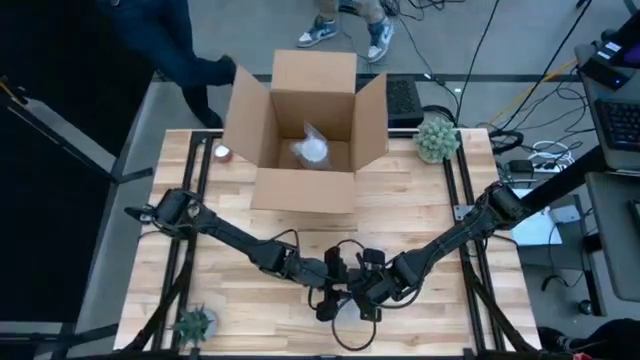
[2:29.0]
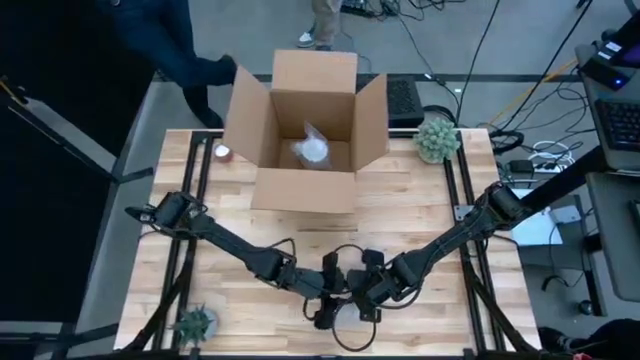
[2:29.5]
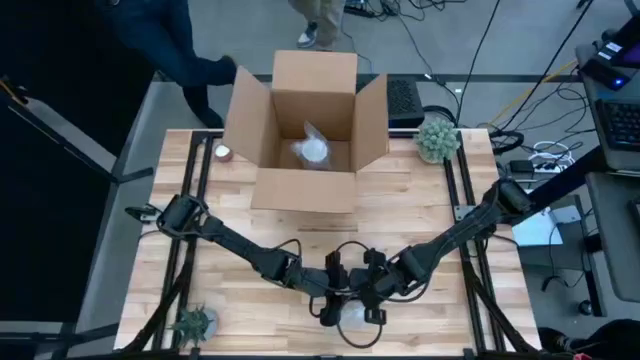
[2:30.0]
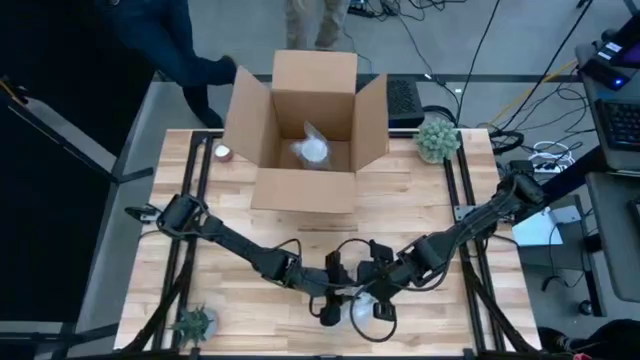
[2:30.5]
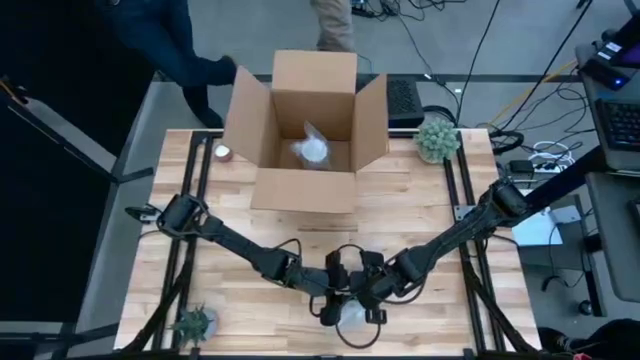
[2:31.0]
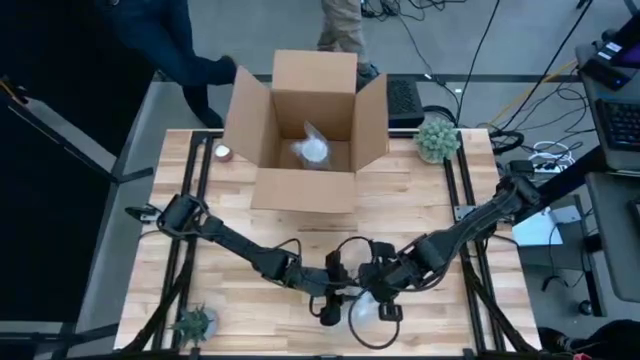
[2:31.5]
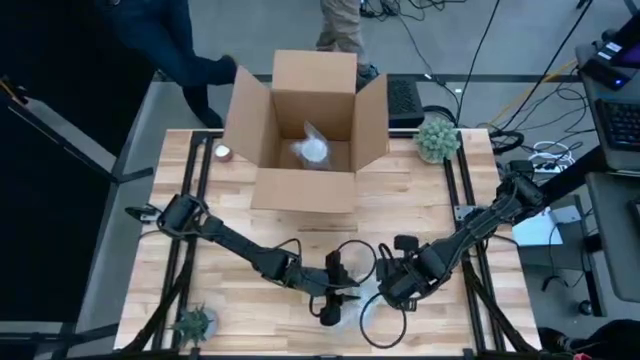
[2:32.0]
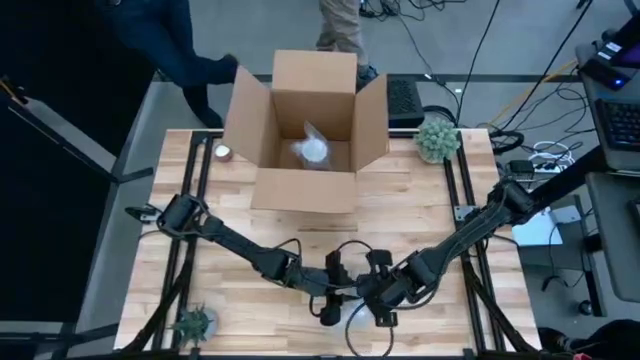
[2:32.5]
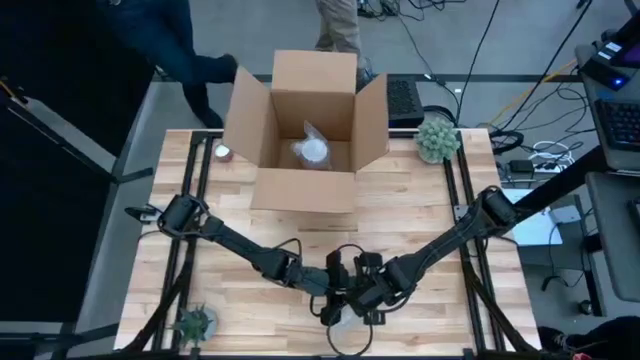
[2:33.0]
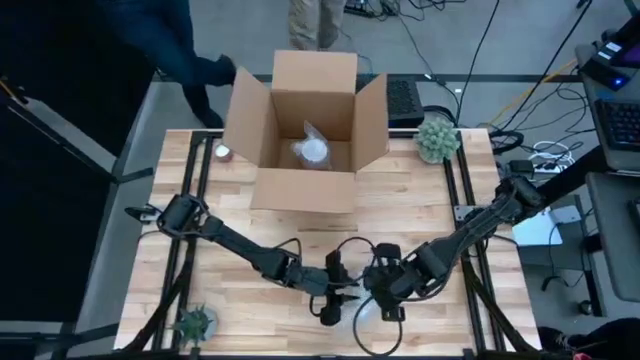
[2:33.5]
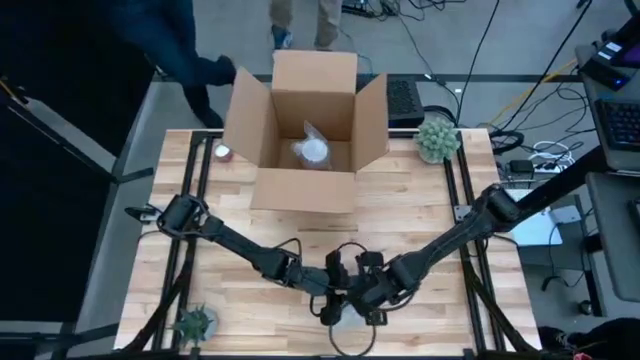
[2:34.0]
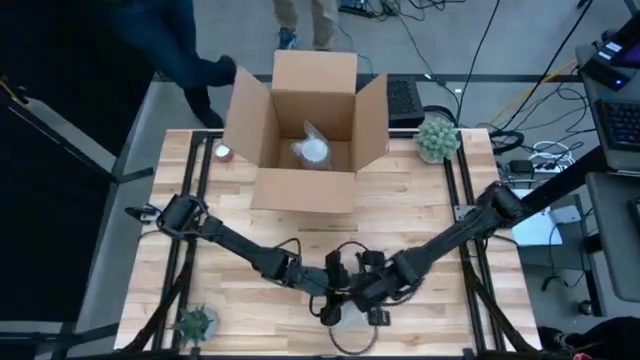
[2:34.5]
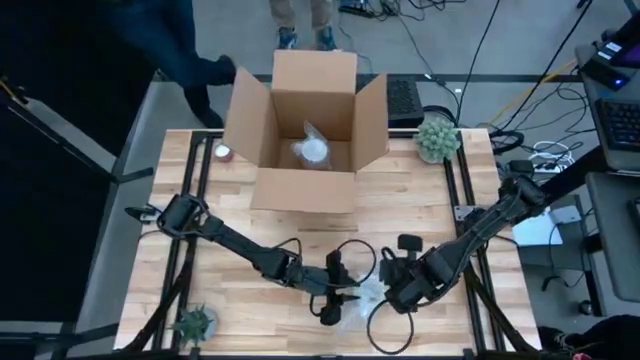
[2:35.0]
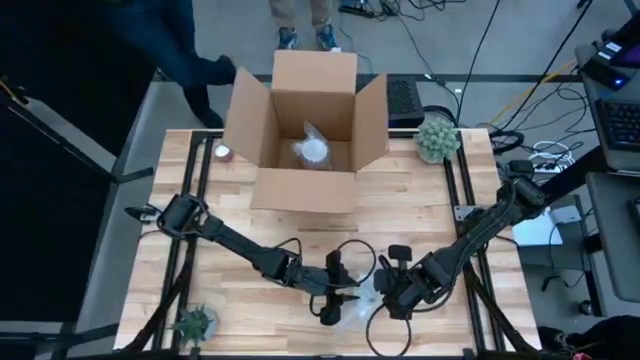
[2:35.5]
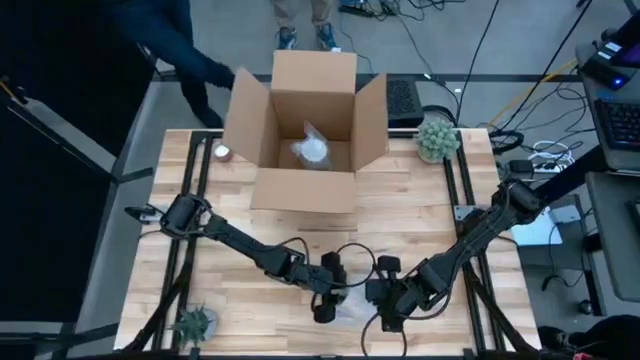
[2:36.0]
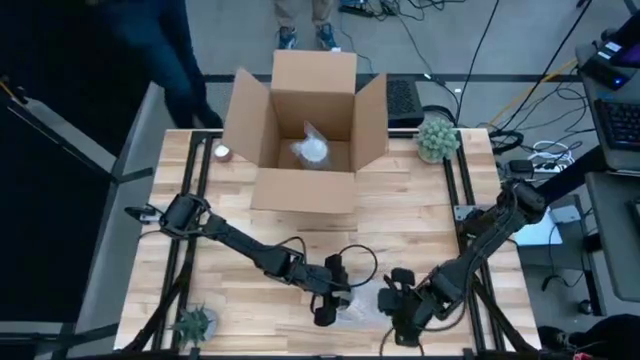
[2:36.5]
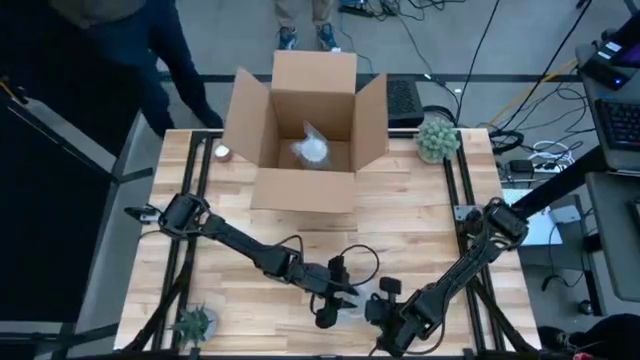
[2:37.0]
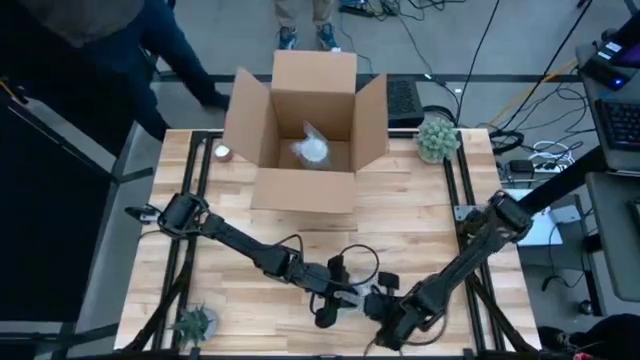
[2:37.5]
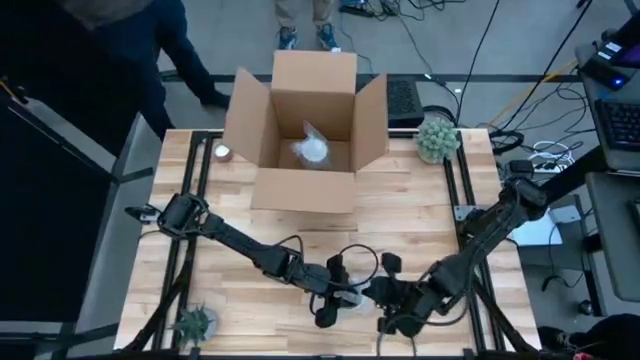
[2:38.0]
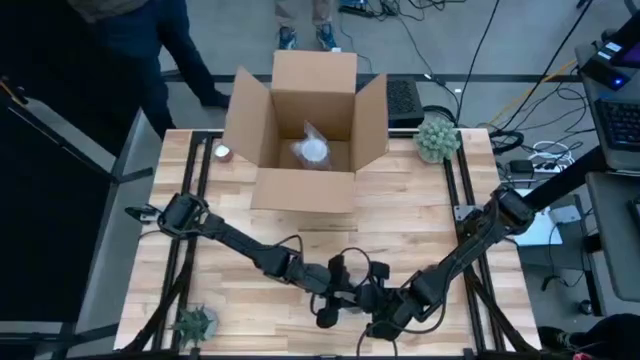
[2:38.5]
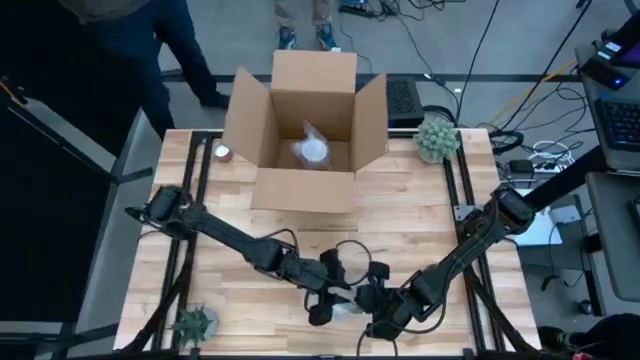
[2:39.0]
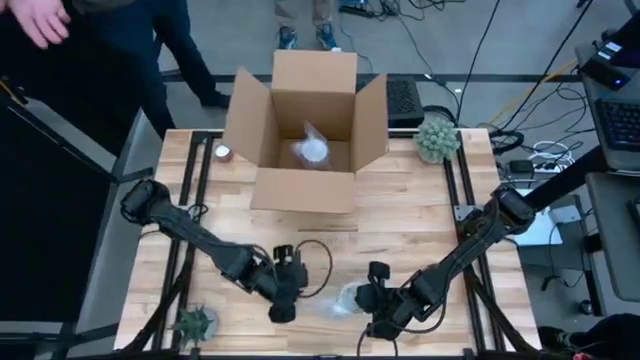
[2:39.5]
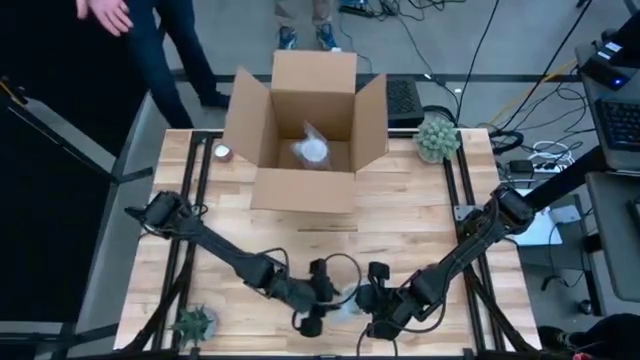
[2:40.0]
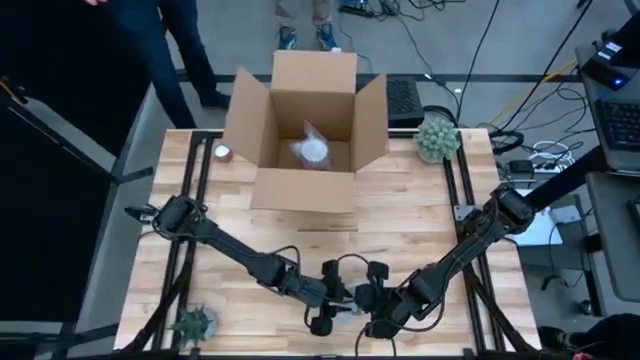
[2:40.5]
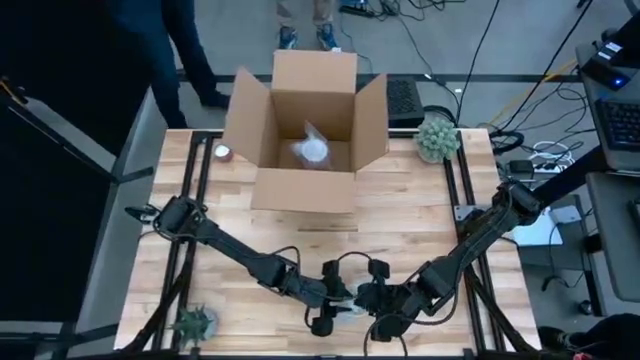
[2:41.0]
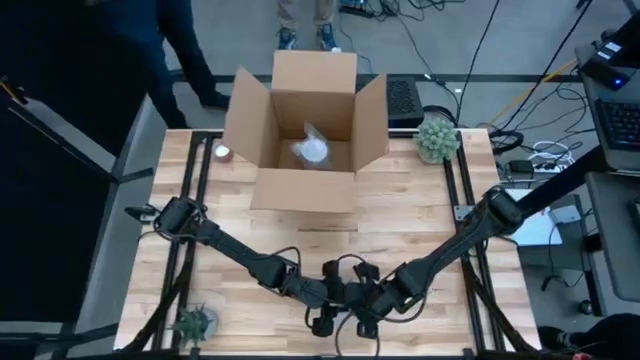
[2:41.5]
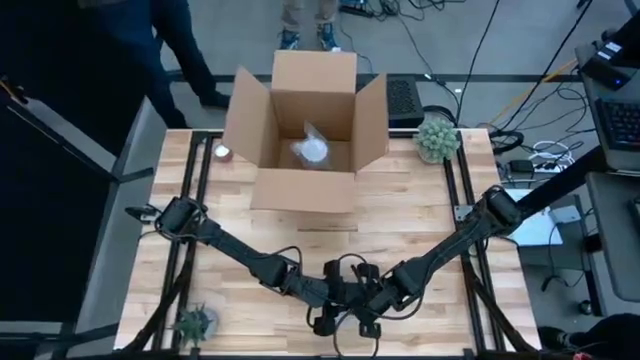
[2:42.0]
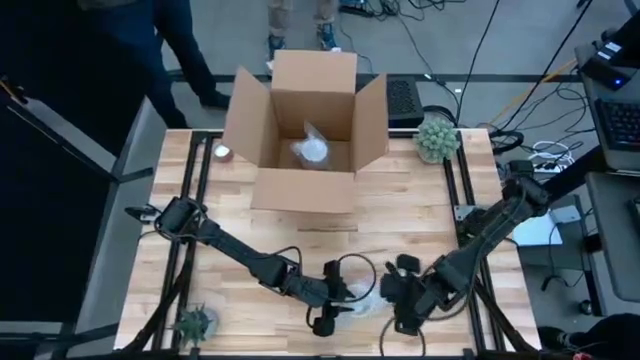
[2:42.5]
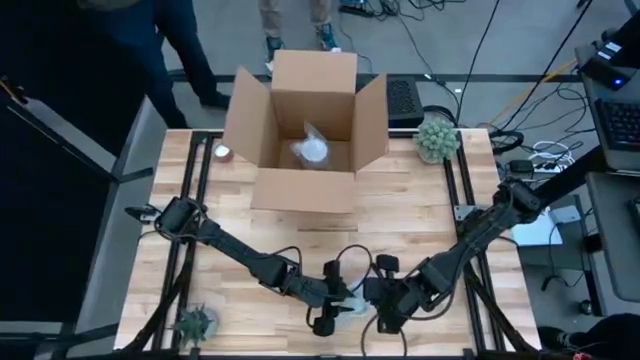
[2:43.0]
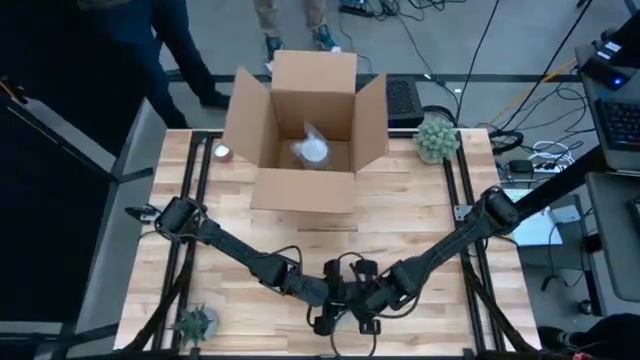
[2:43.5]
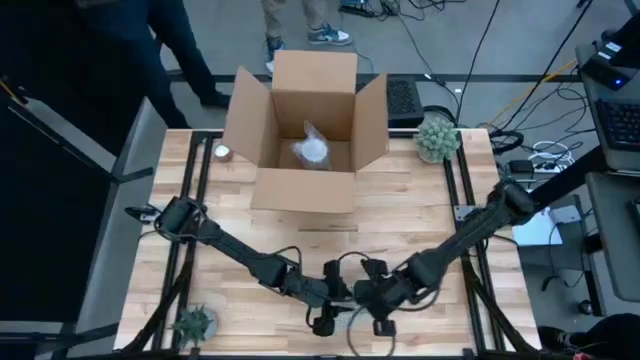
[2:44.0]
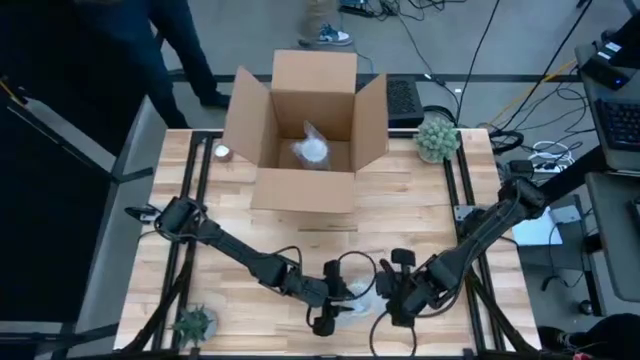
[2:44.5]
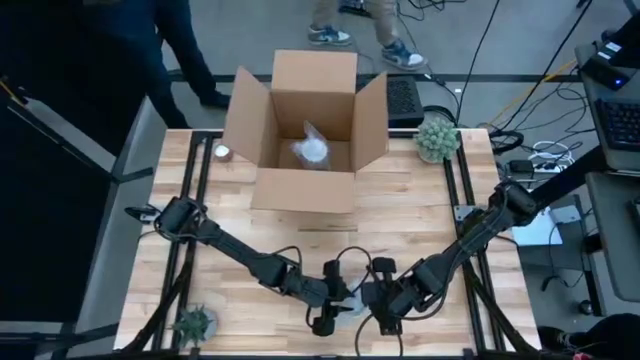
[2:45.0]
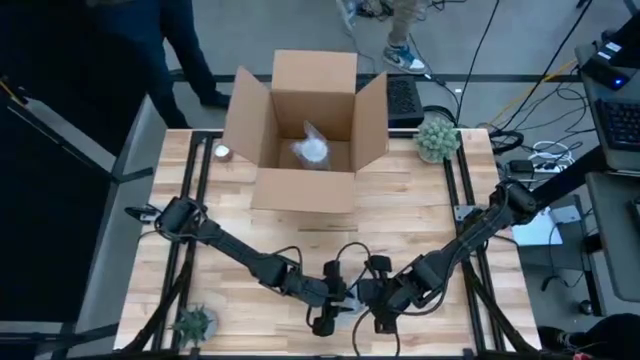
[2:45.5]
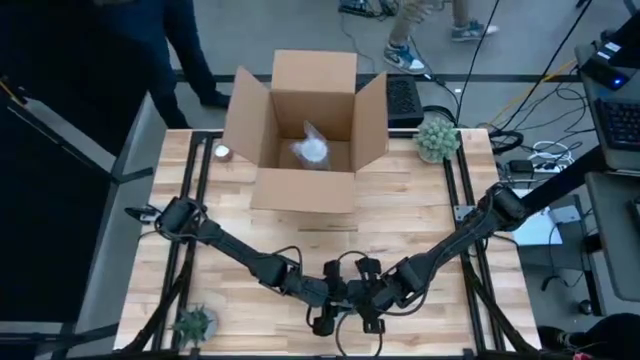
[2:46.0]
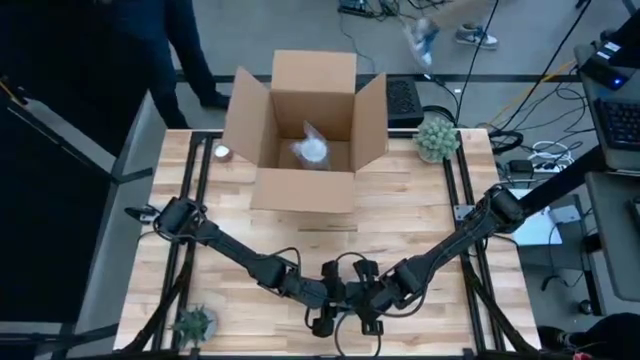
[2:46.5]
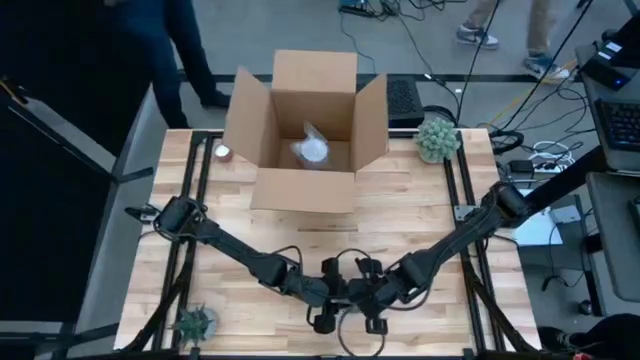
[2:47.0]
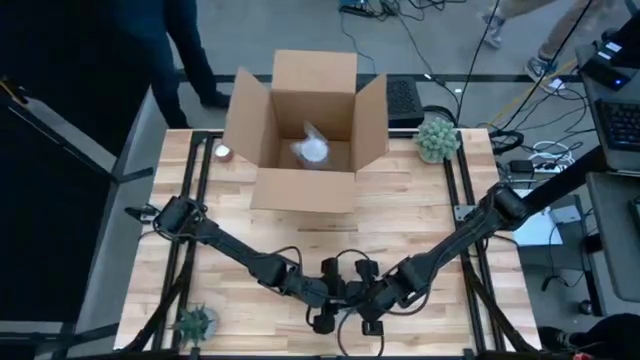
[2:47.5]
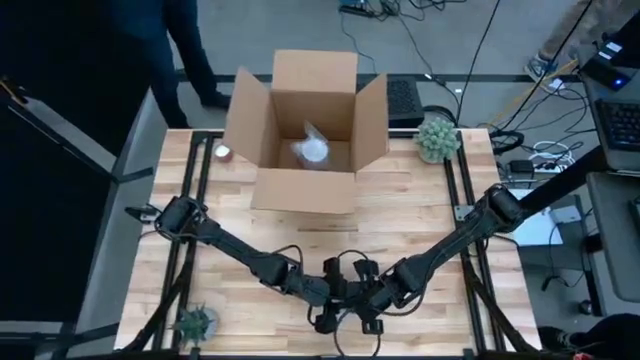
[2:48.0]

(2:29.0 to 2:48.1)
Task: wrap mug
Wrap the orange cup with the transparent bubble wrap

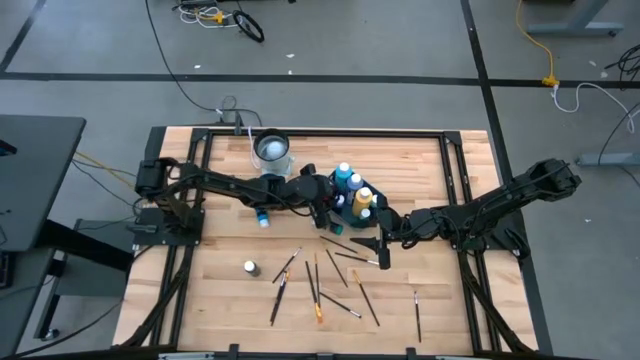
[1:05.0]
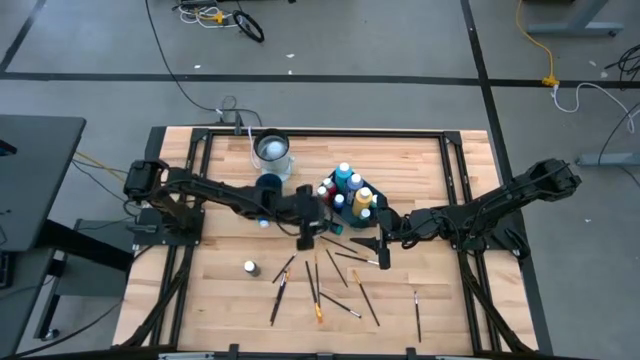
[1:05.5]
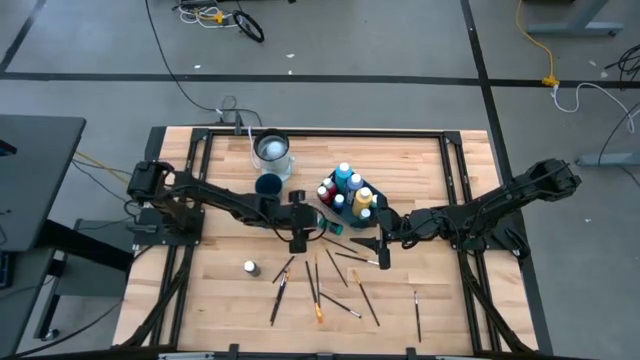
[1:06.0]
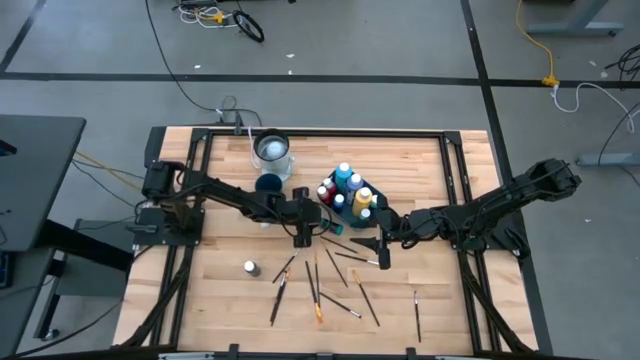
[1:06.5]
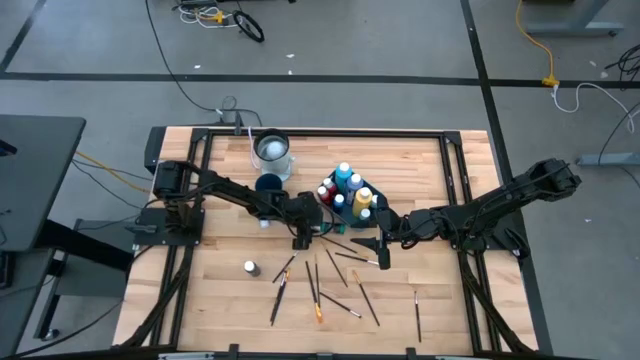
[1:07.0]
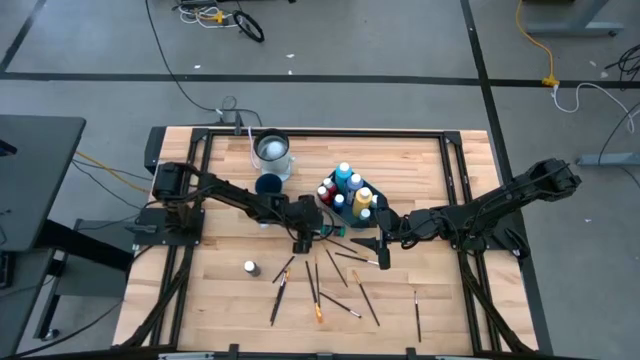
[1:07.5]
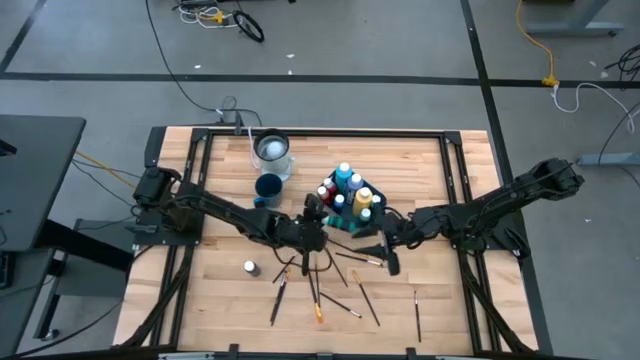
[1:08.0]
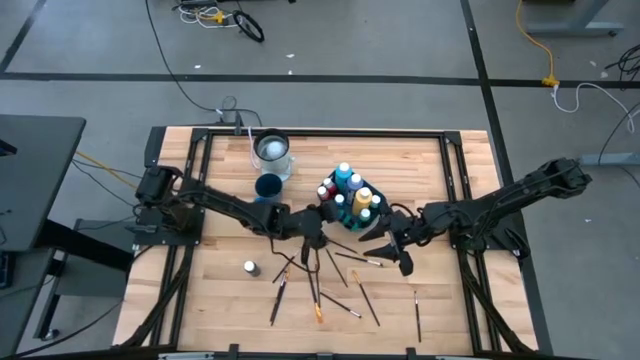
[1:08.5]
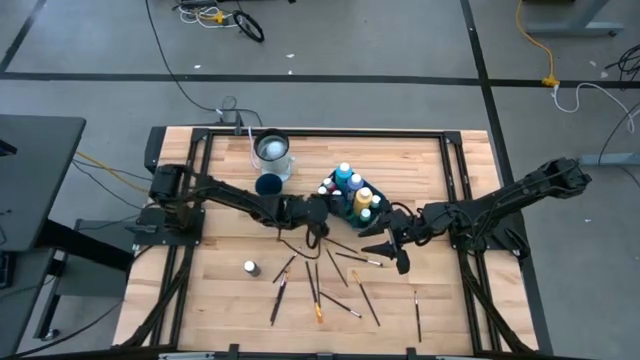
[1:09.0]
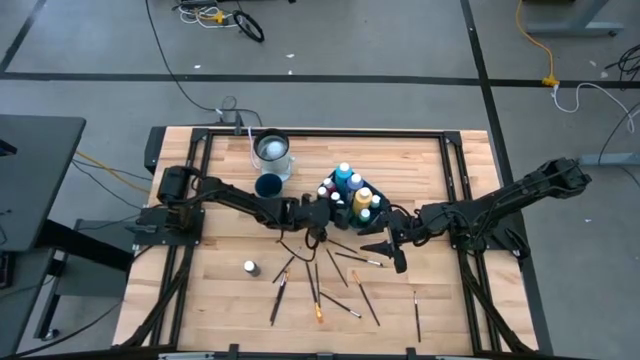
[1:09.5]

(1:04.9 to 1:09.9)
Task: Pick & Place Paint Supplies
Put the small light blue paint bottle into the blue bin
